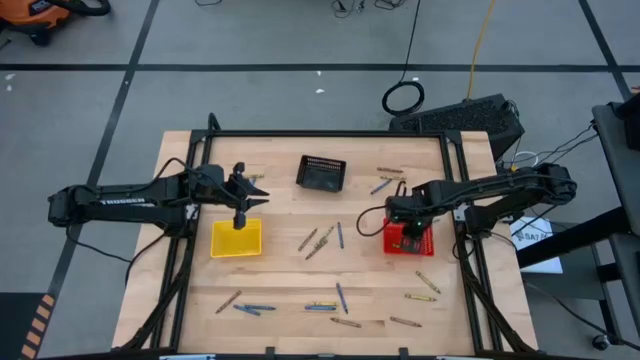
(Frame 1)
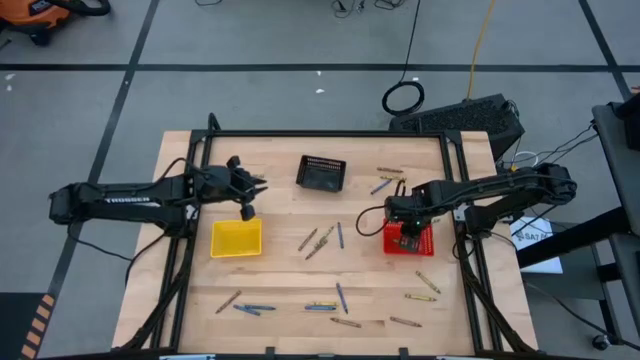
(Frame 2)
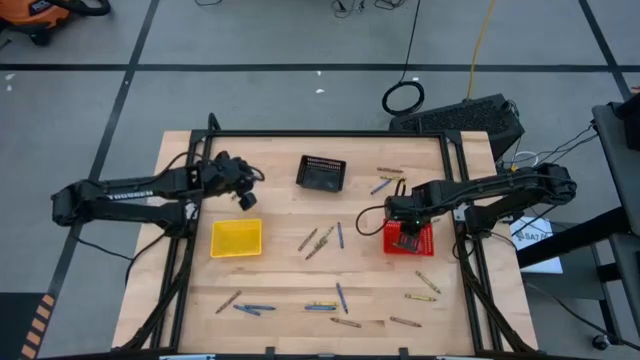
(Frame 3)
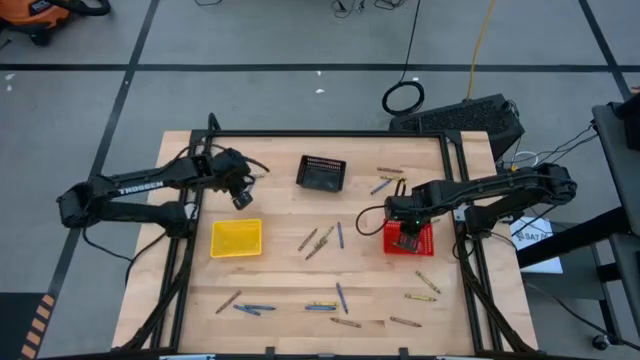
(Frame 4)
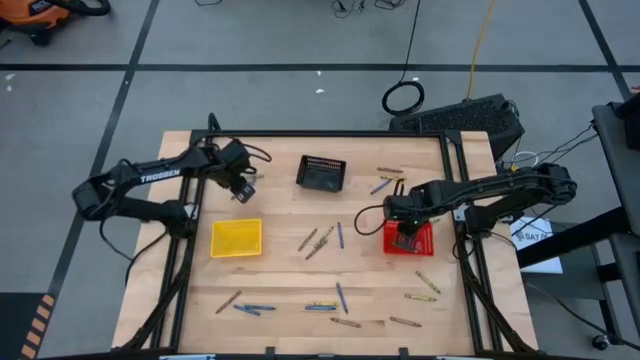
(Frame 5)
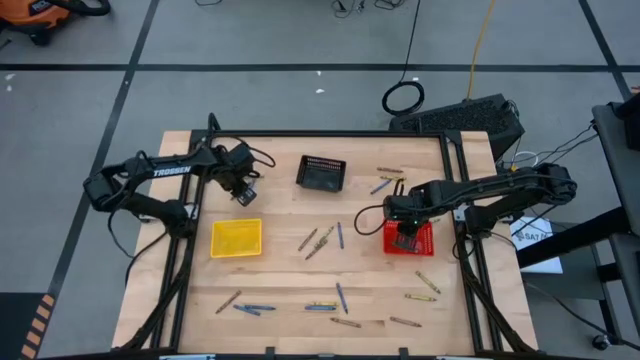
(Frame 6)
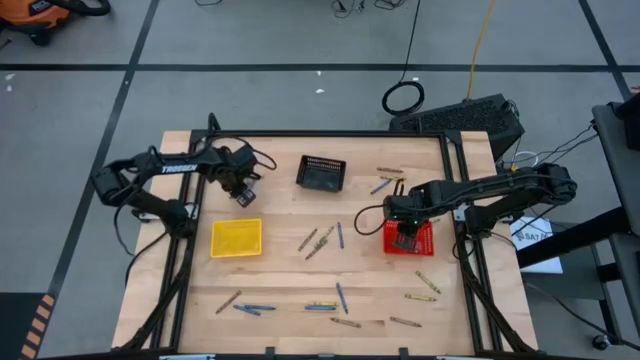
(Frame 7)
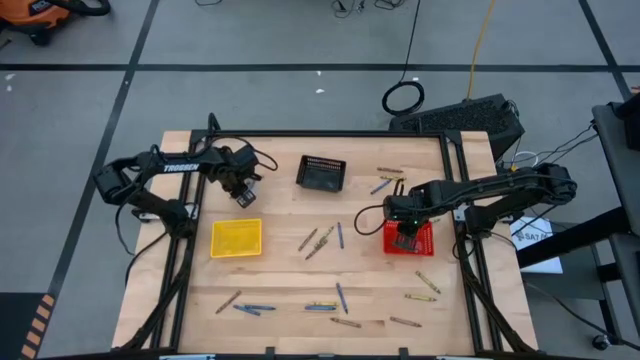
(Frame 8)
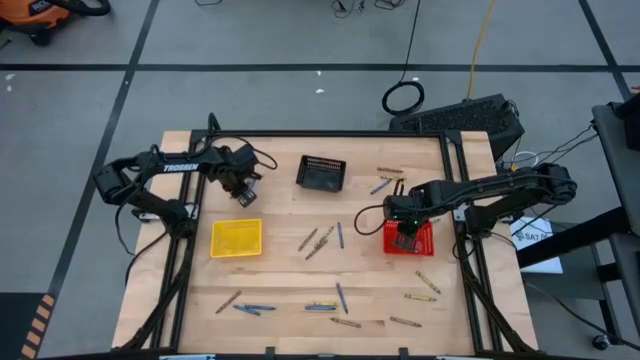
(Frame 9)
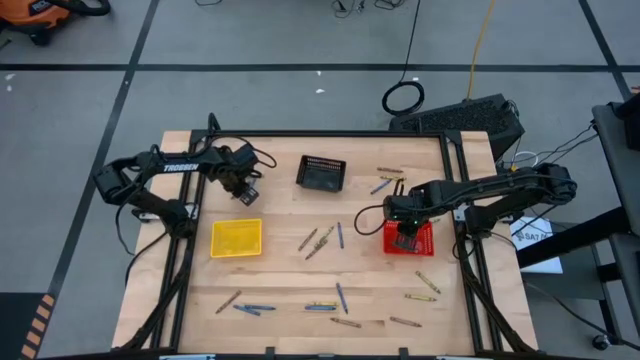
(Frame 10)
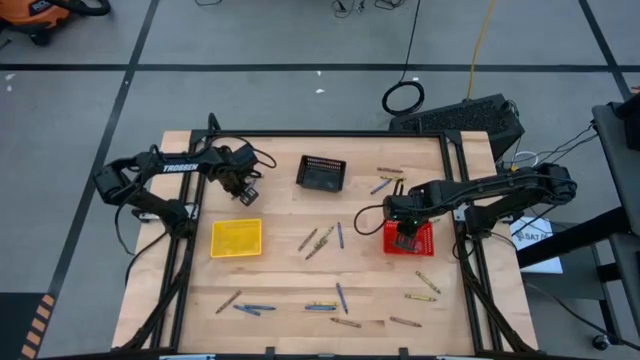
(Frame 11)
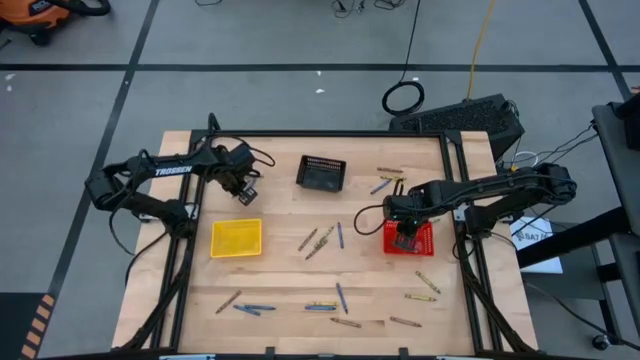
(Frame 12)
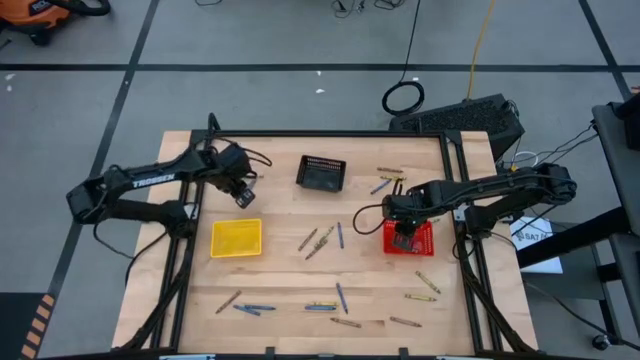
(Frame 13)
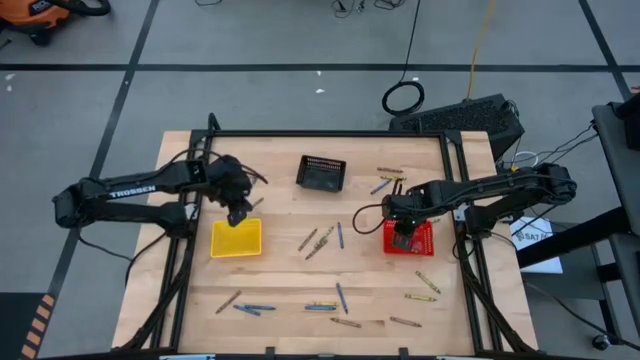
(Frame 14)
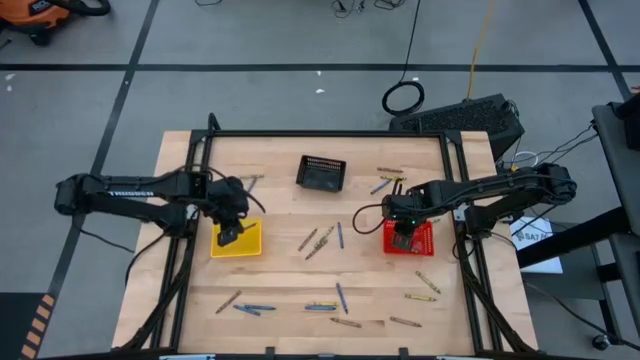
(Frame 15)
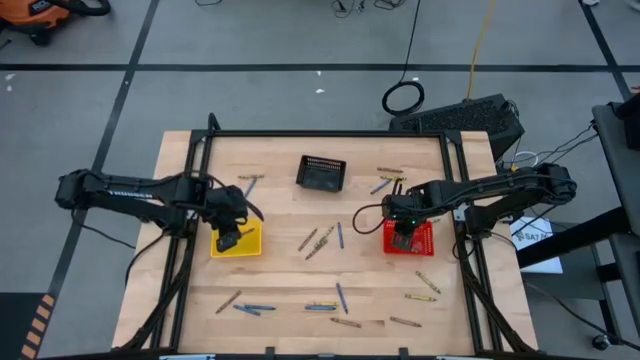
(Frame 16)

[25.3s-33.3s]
Task: Sort crayons
Put the brown crayon into the yellow bin

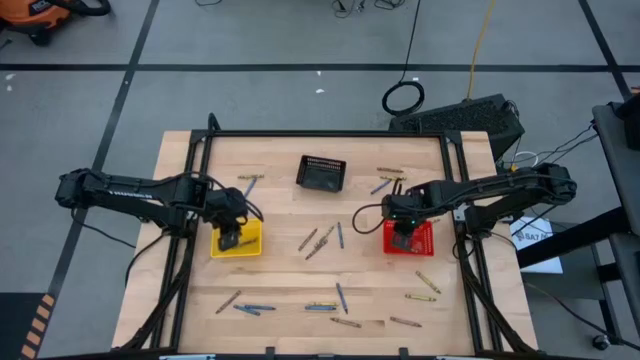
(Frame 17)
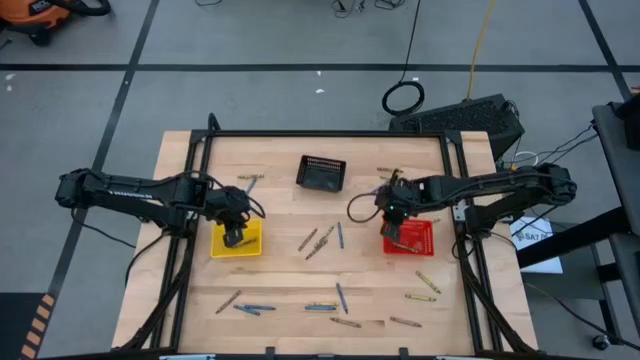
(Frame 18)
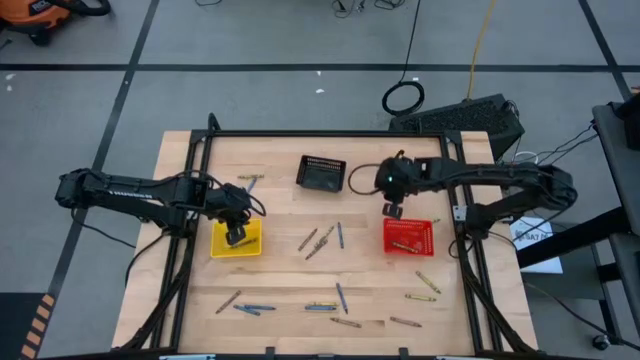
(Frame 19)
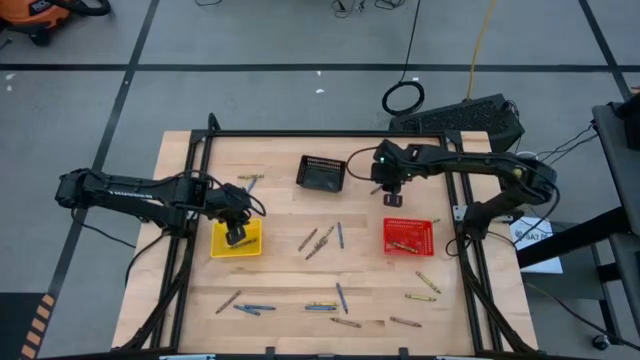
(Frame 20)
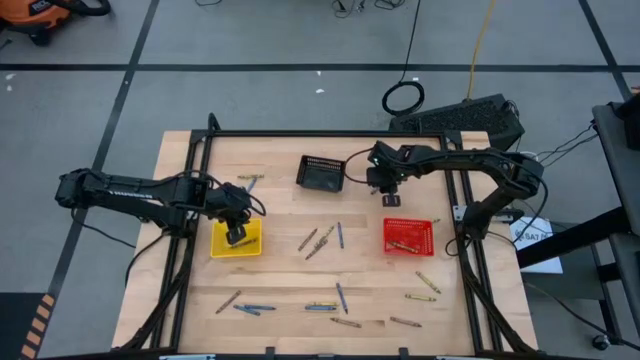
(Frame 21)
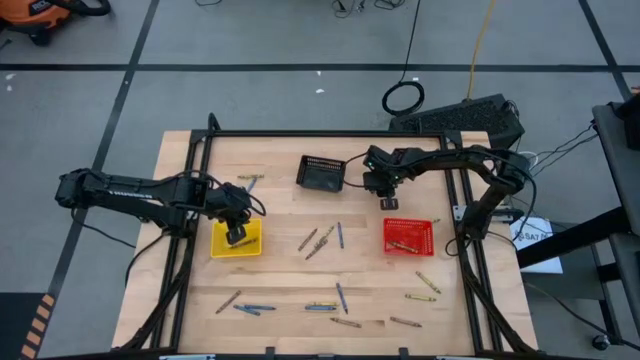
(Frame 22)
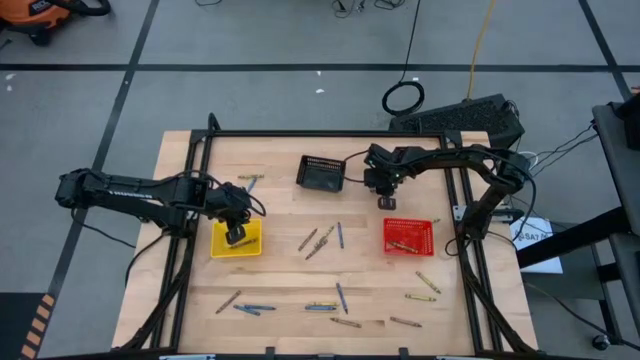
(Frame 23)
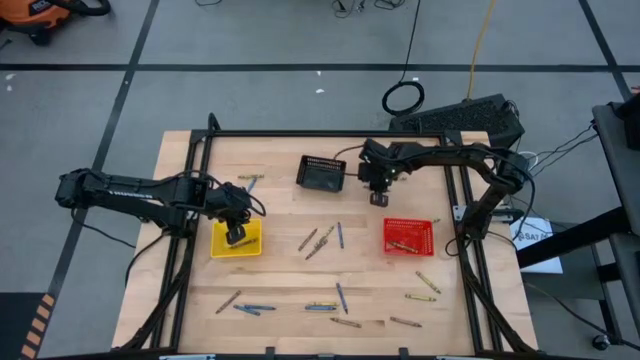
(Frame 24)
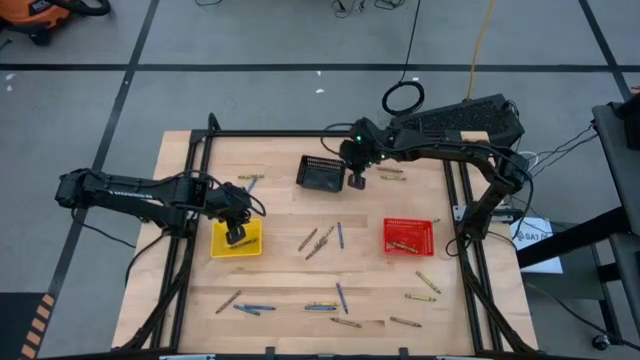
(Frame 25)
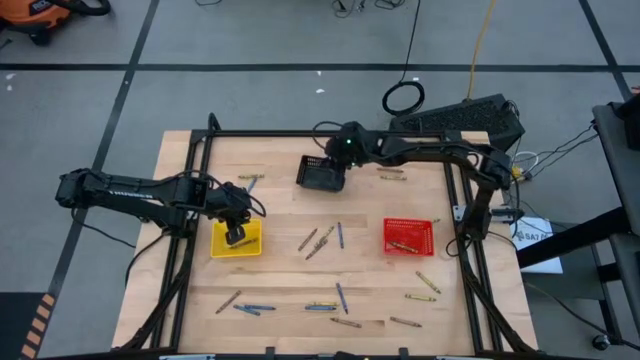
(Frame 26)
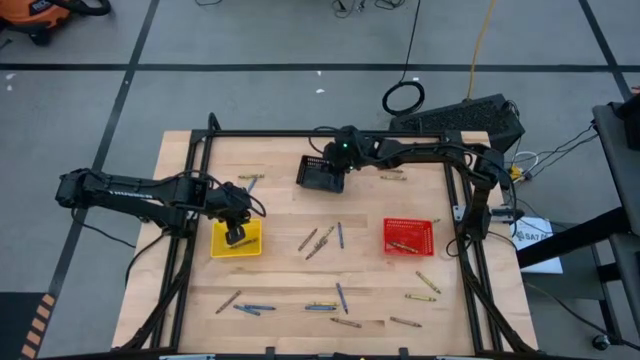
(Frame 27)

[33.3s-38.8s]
Put the blue crayon into the black bin

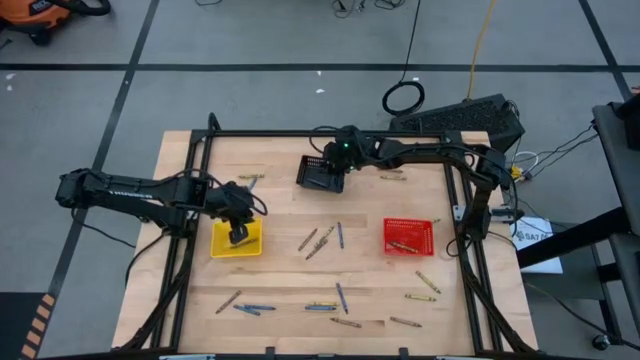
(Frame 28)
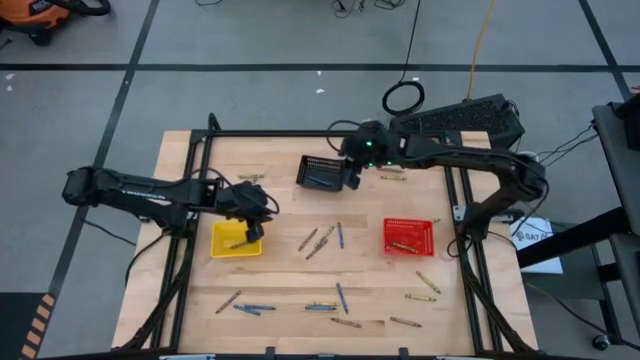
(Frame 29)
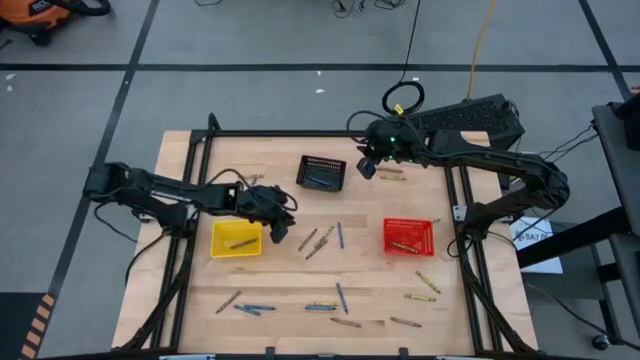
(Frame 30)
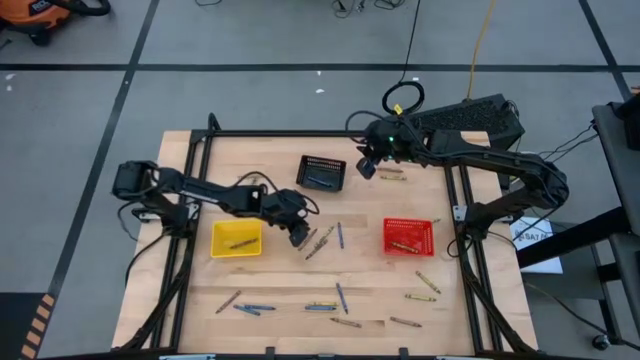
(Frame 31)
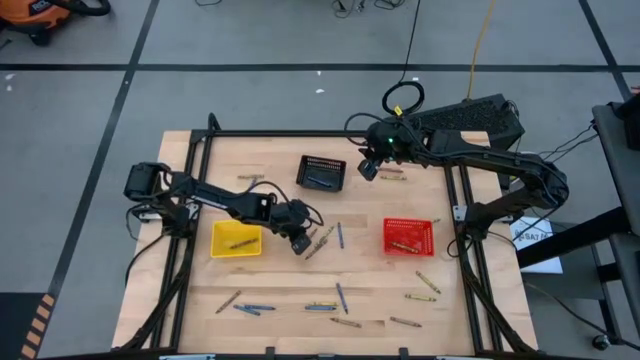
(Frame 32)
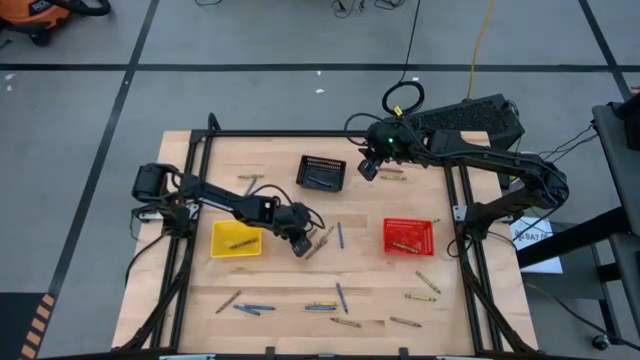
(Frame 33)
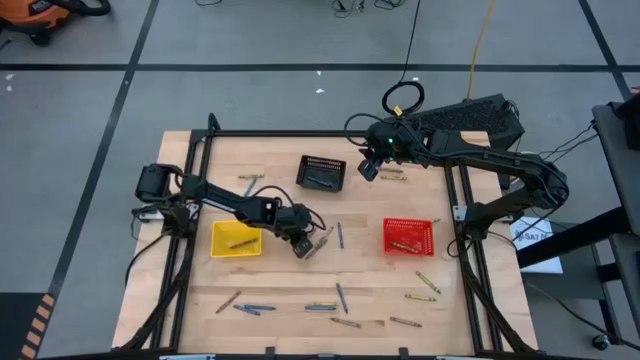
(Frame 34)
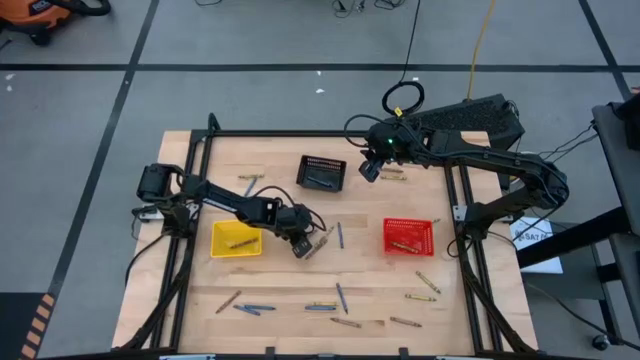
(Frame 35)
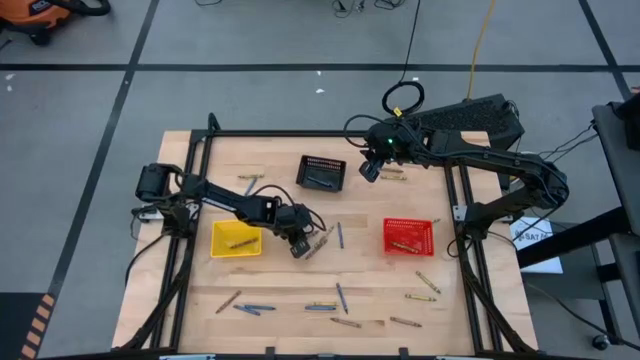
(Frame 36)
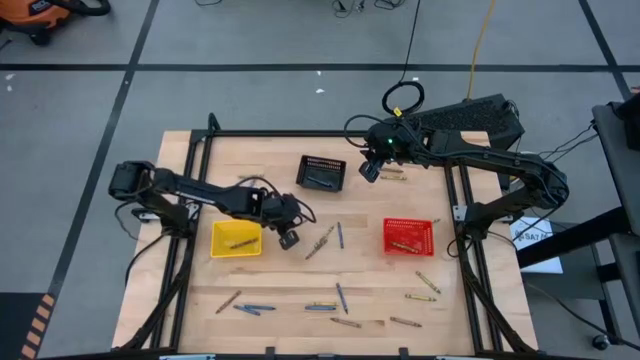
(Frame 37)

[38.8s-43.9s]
Put the brown crayon into the yellow bin

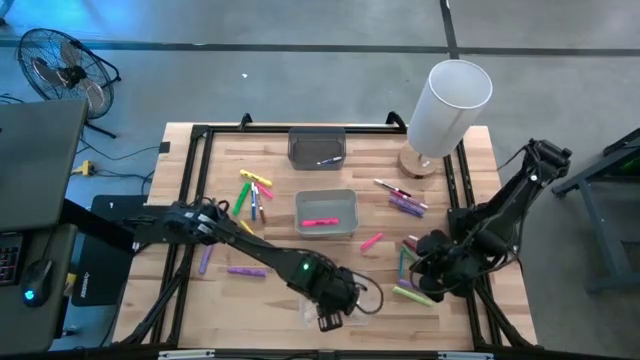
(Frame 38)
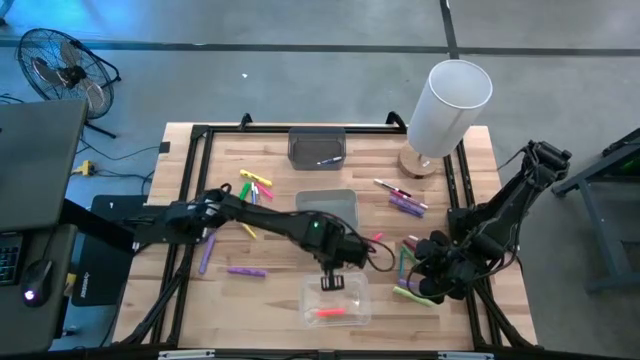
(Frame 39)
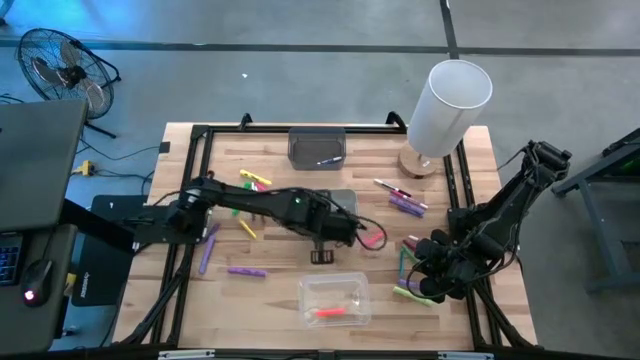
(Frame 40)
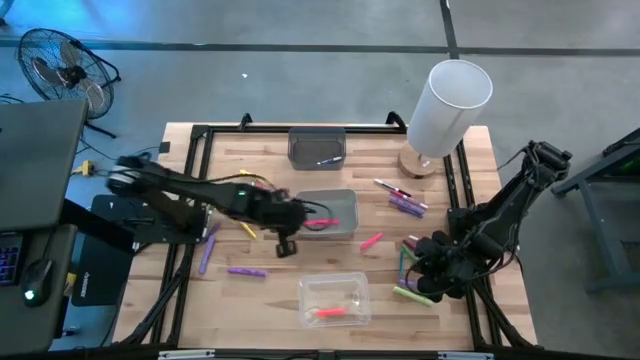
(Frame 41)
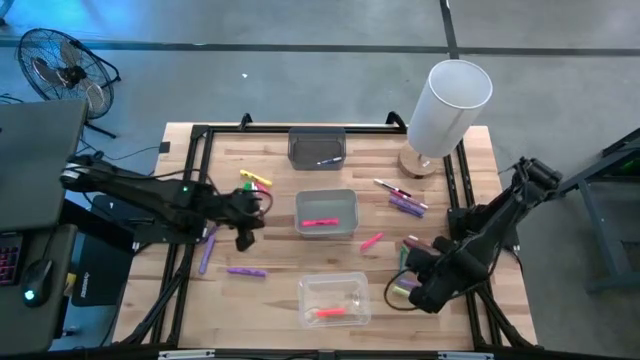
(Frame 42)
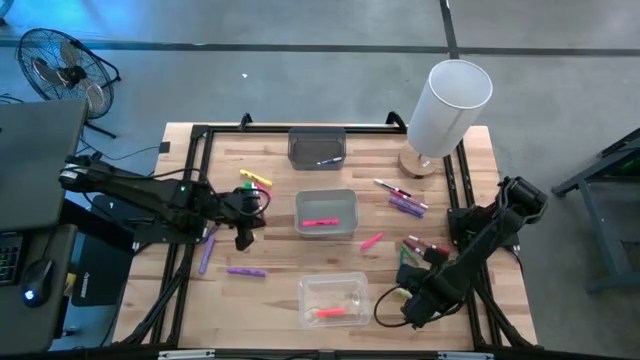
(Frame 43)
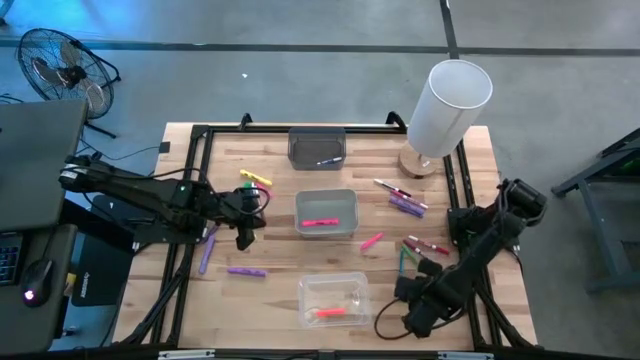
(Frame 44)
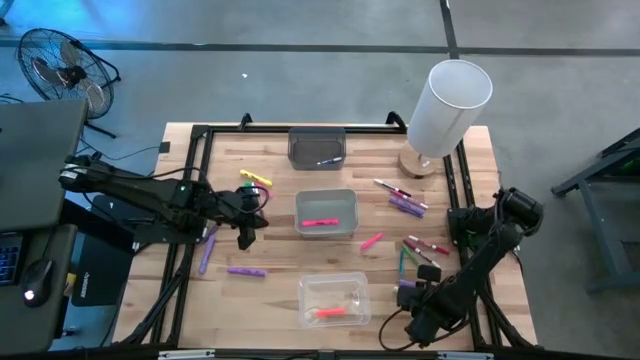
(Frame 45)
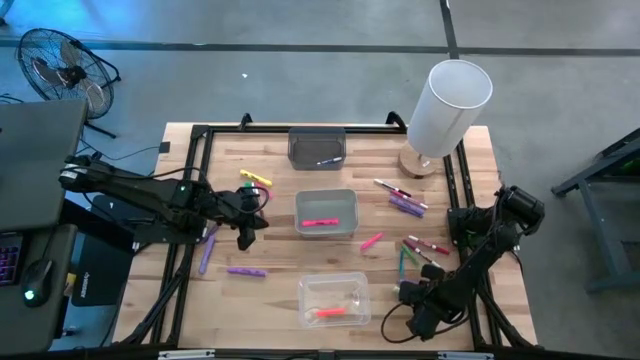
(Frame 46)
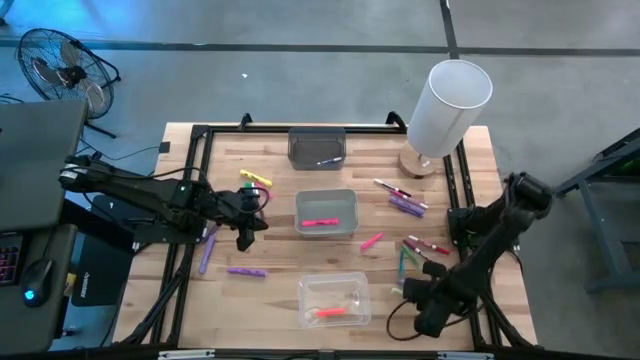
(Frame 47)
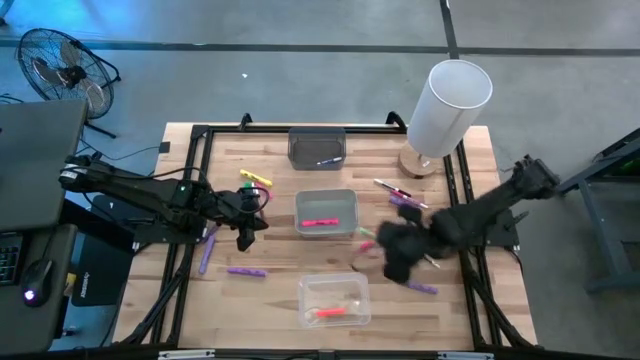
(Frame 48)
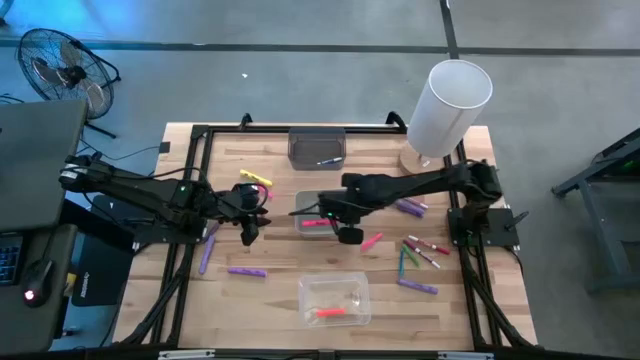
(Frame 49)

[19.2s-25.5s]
Task: Pick & Place Markers
Put the light green highlighter pen into the gray bin
